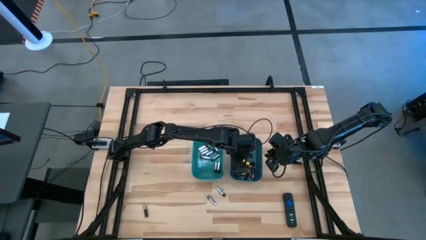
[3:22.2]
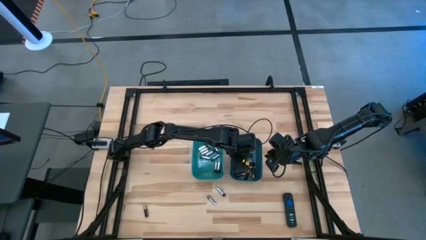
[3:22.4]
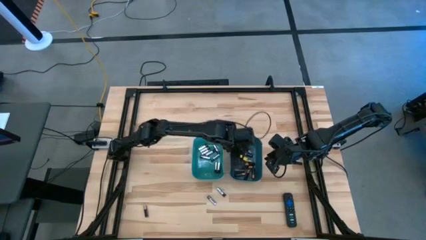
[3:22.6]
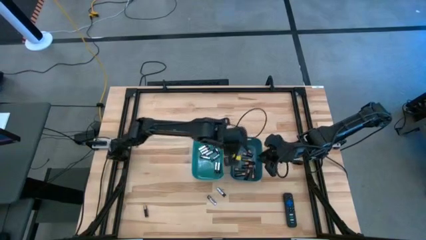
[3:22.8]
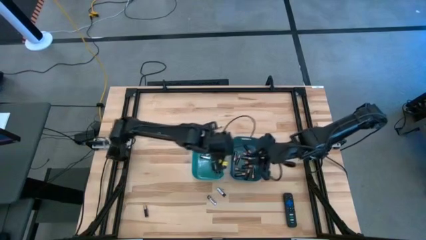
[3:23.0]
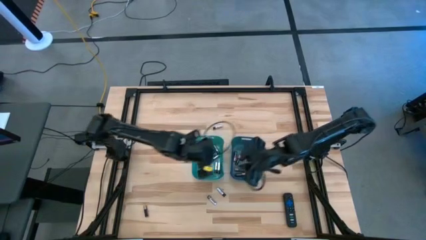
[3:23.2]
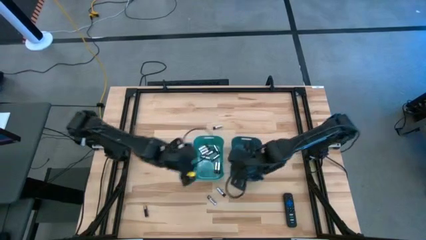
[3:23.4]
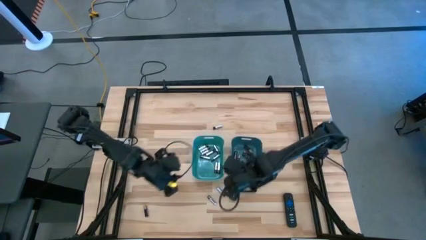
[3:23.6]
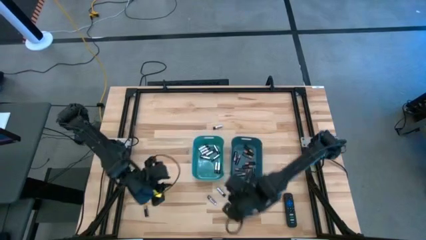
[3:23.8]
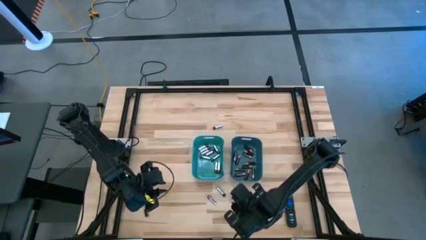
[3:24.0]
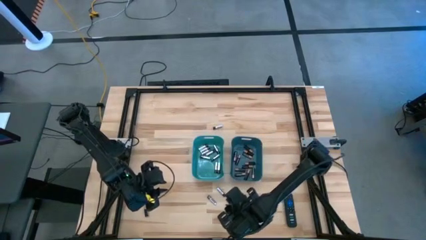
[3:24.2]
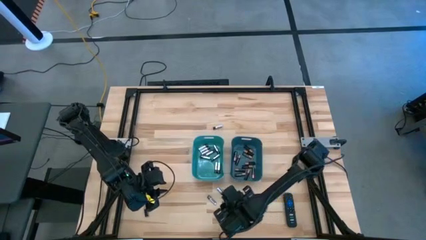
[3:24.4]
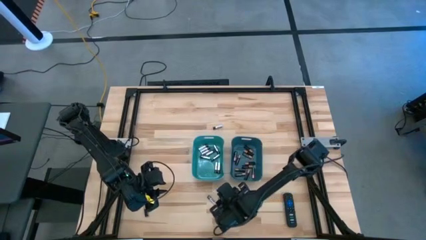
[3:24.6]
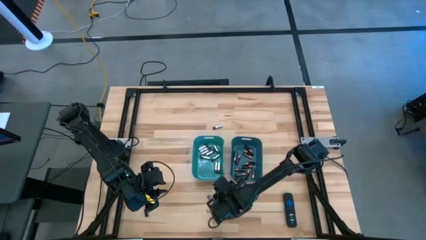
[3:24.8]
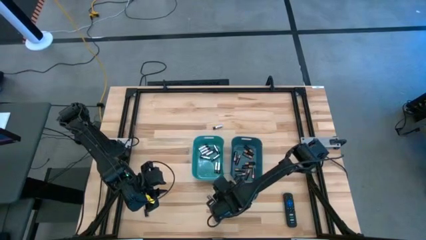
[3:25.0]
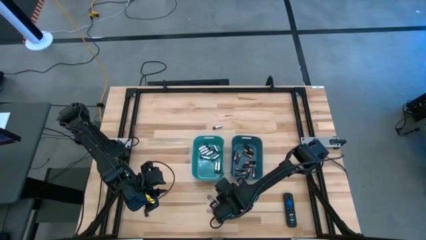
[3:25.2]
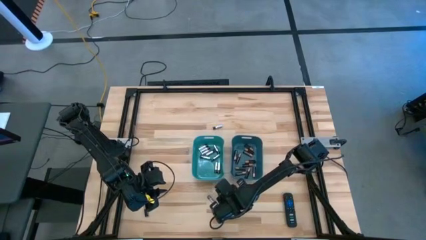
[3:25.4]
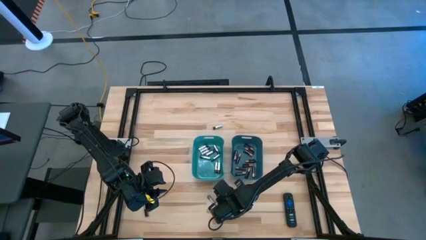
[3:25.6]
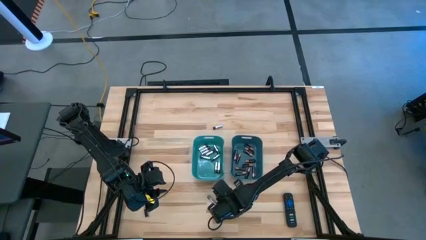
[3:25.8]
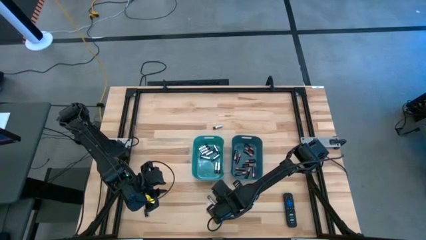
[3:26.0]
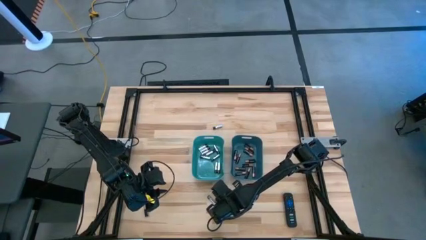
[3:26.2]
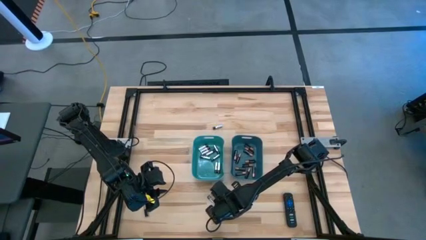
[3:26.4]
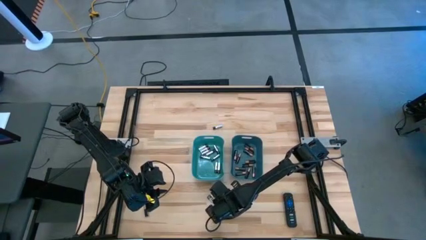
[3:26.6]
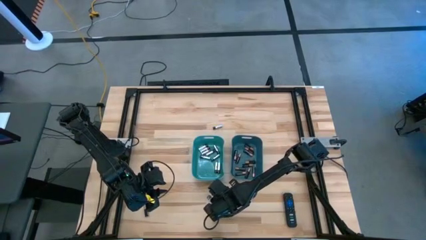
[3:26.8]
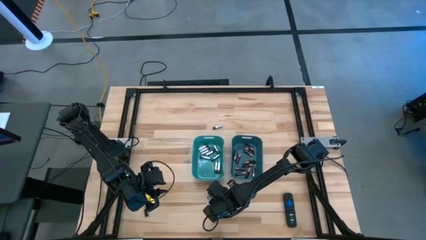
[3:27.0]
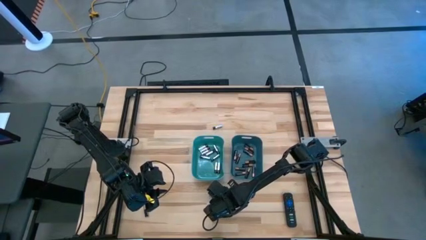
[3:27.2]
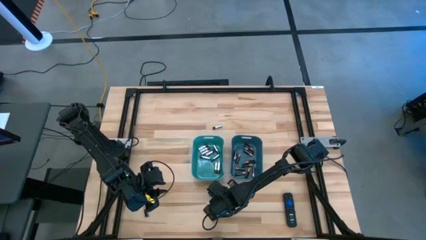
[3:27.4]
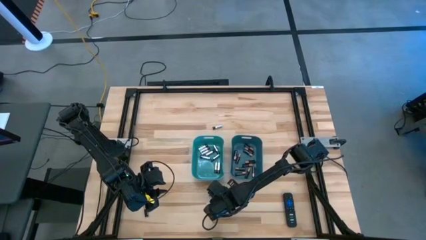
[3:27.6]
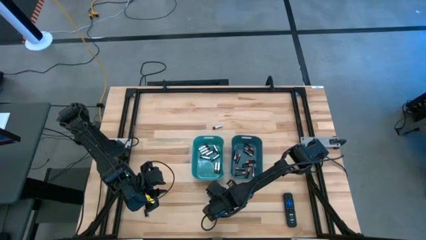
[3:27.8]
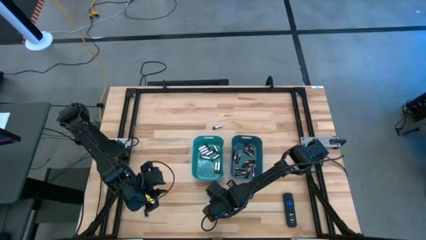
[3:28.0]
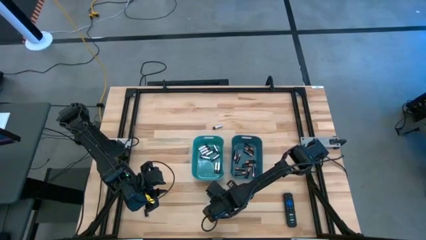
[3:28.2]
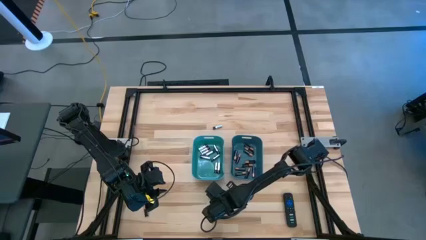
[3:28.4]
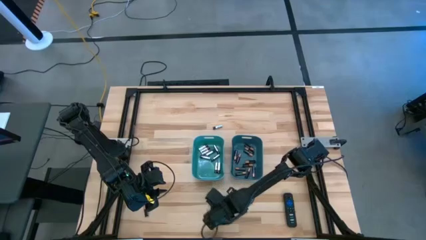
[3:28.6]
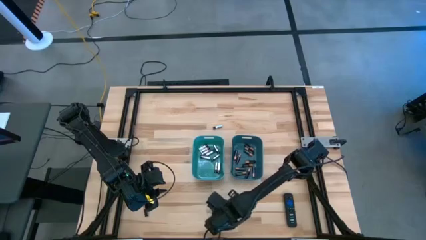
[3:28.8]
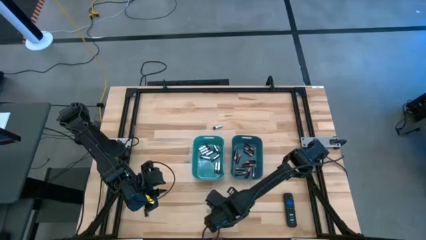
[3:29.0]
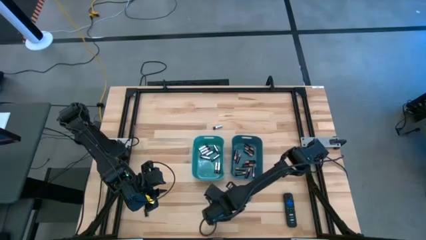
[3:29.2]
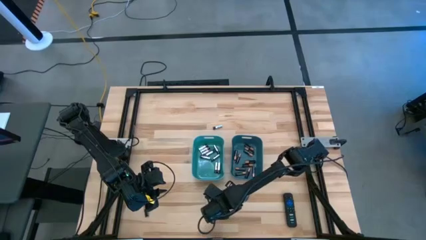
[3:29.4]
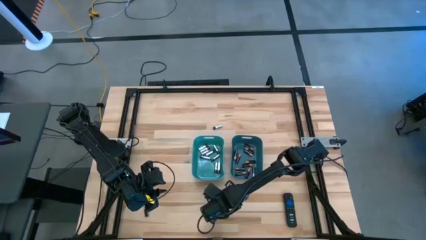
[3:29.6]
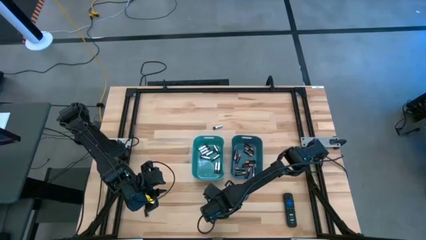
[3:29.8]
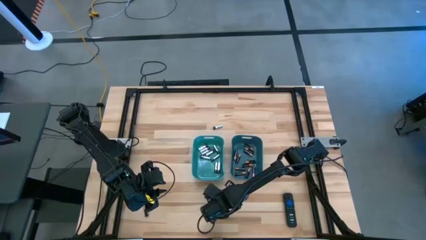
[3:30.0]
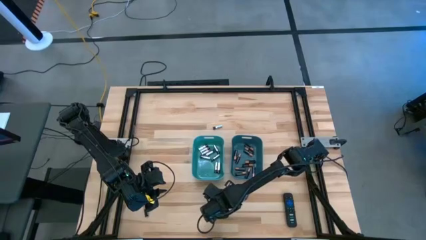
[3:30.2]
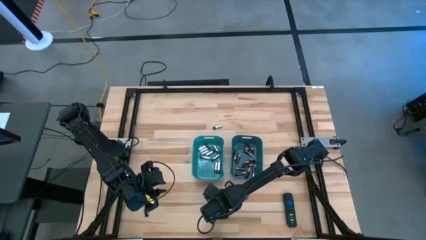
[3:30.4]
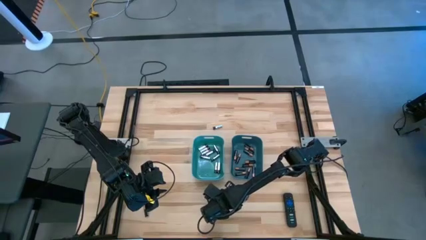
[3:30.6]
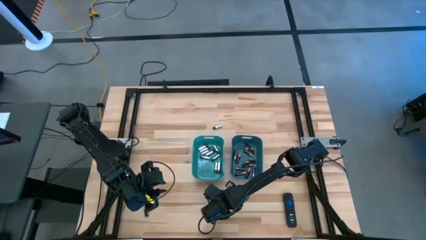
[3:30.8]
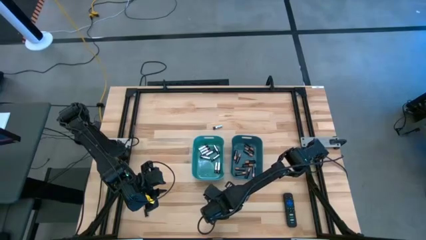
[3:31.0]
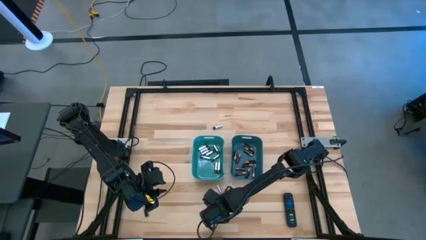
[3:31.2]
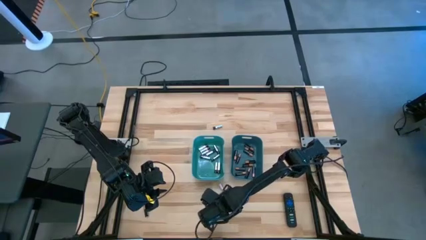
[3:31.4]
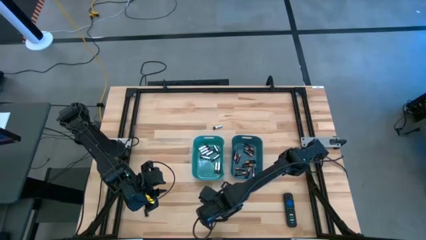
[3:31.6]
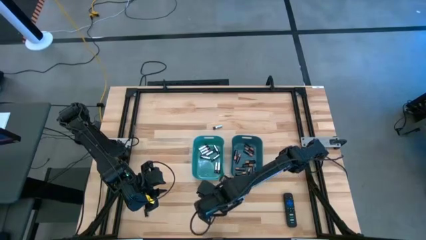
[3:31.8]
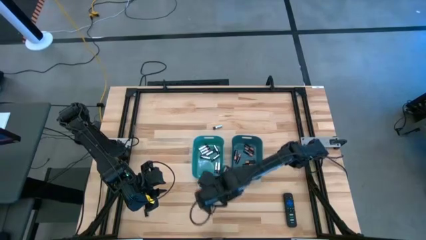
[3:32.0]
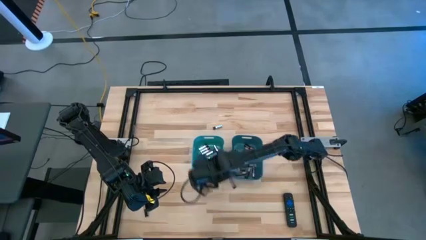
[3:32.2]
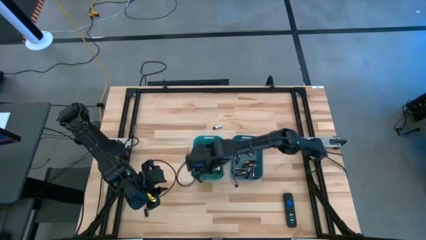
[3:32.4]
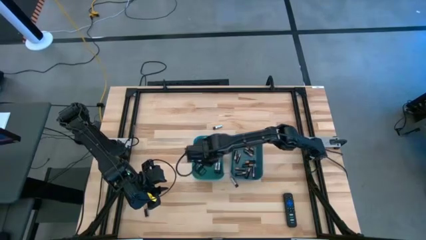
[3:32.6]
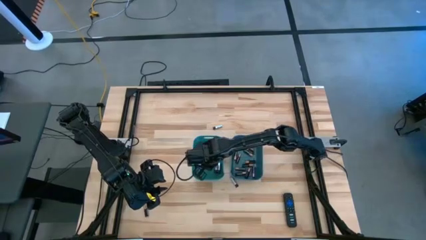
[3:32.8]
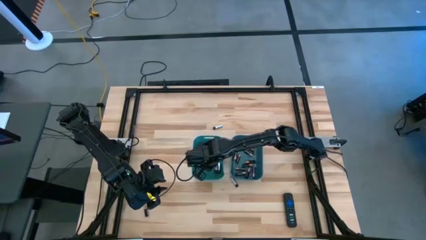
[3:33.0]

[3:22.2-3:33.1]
Task: Sort batteries
Put the white battery into the green bin
